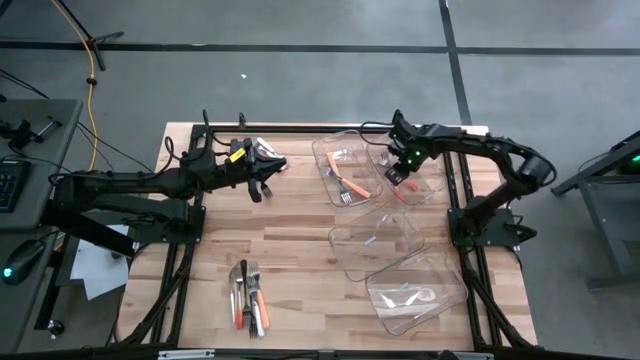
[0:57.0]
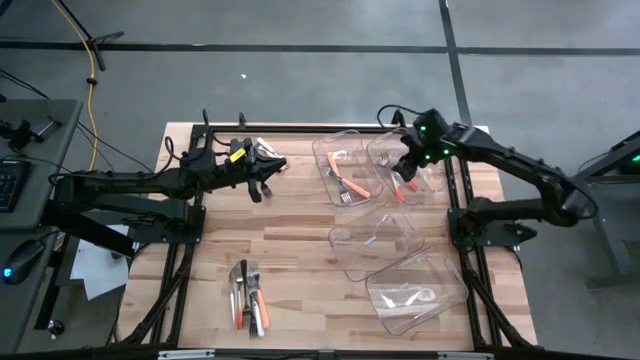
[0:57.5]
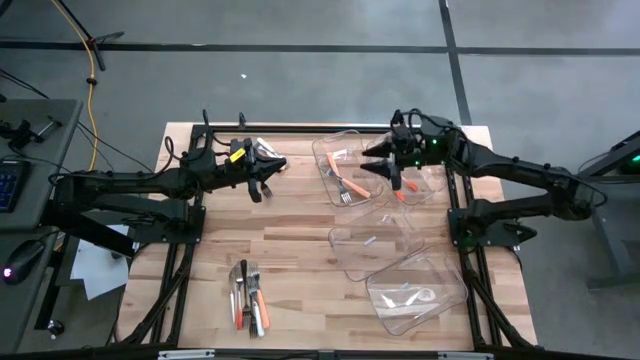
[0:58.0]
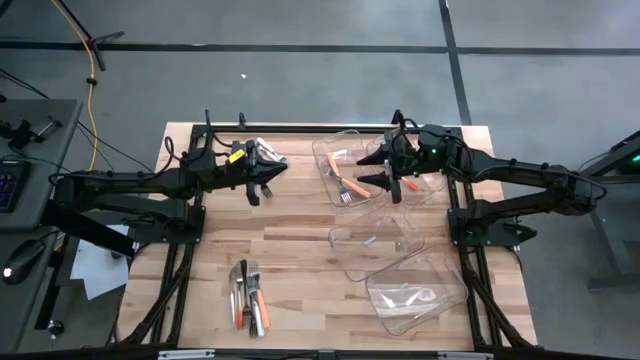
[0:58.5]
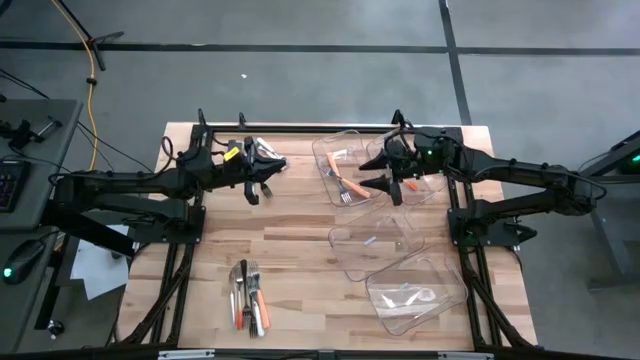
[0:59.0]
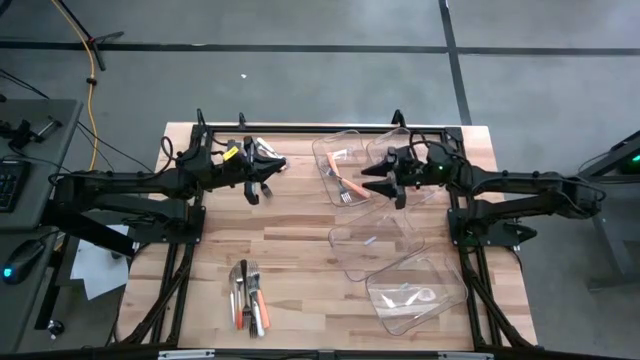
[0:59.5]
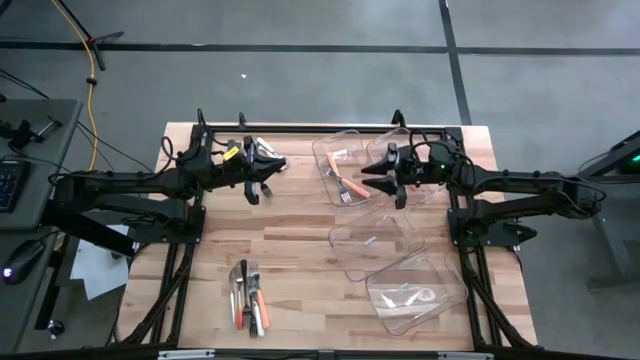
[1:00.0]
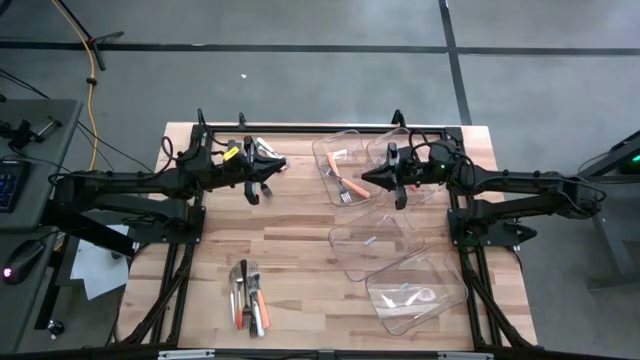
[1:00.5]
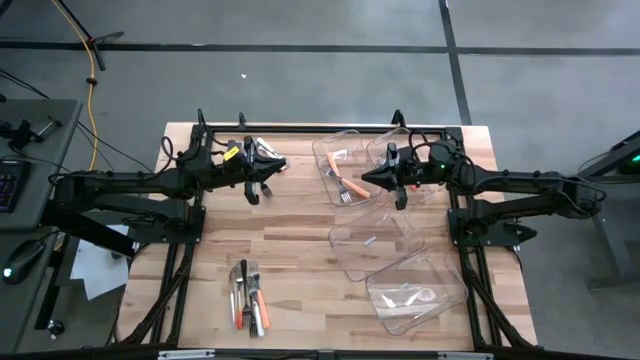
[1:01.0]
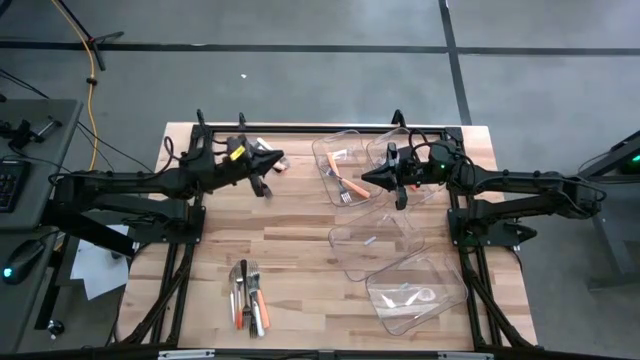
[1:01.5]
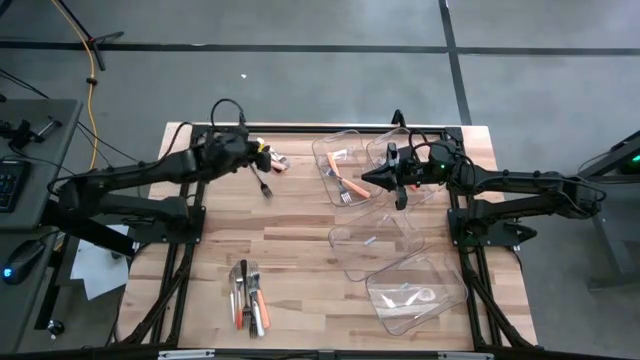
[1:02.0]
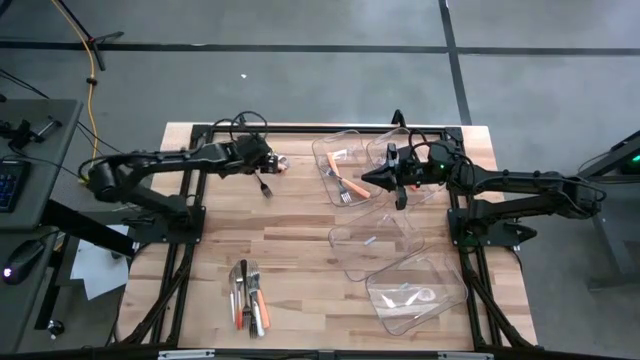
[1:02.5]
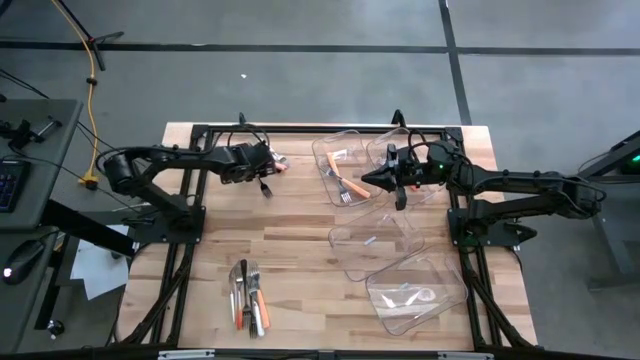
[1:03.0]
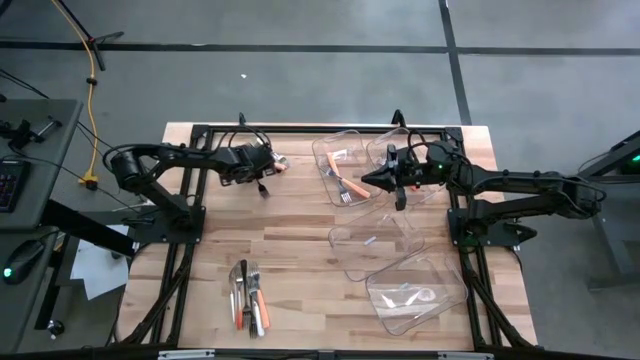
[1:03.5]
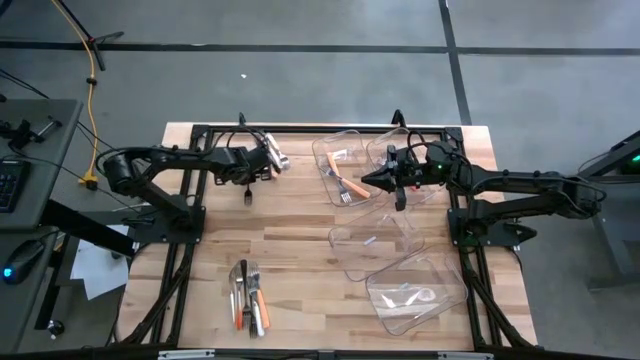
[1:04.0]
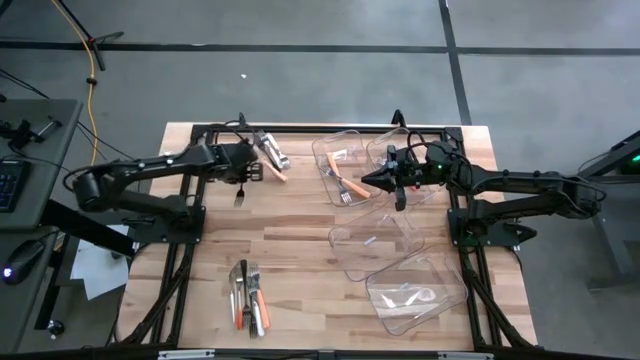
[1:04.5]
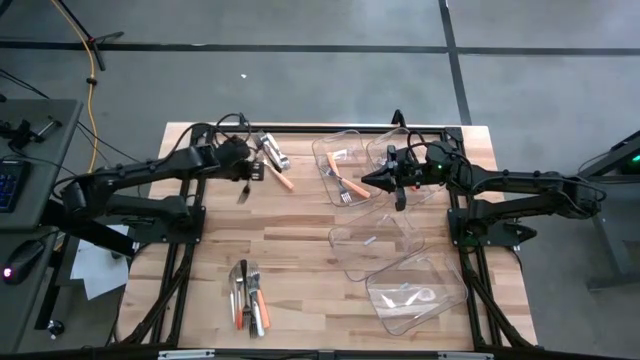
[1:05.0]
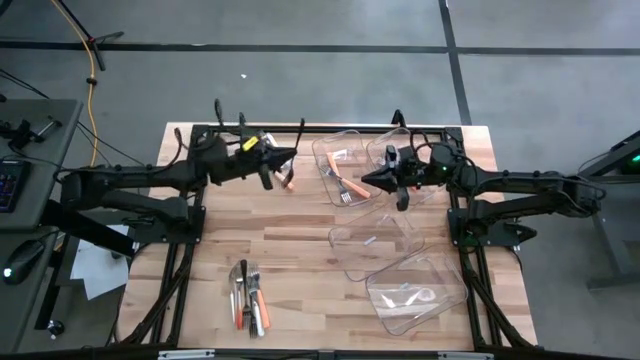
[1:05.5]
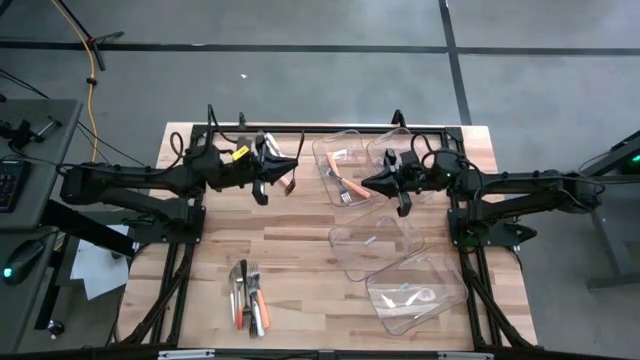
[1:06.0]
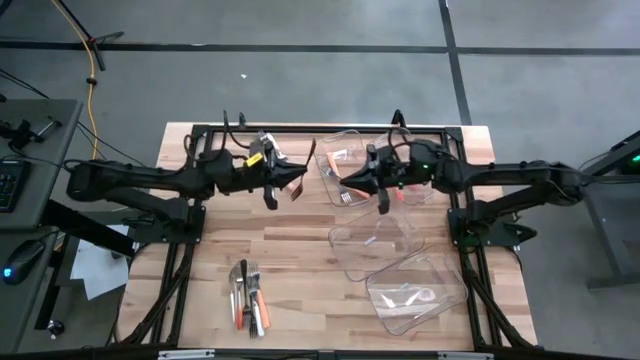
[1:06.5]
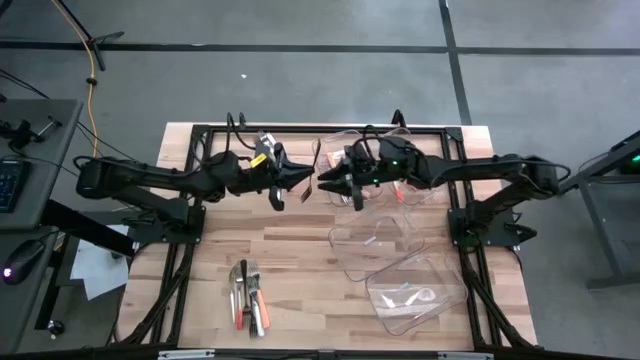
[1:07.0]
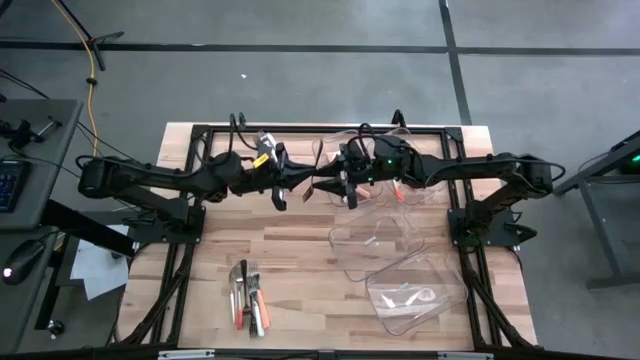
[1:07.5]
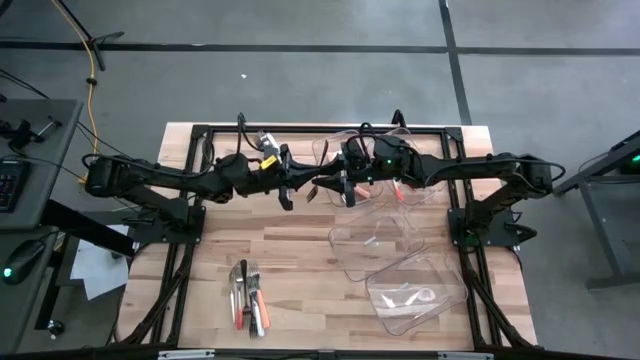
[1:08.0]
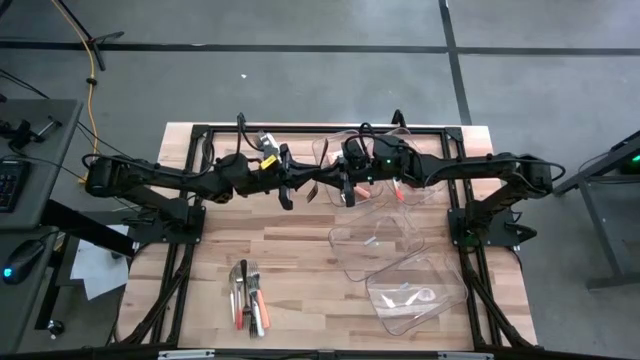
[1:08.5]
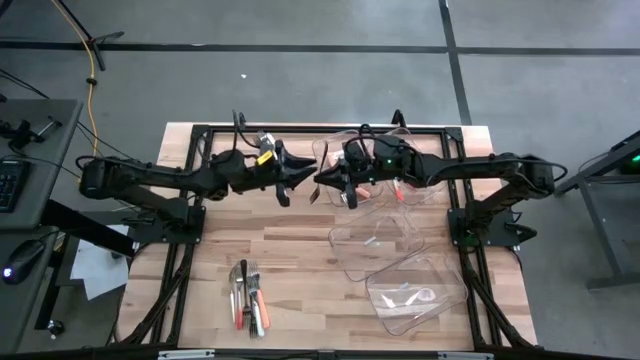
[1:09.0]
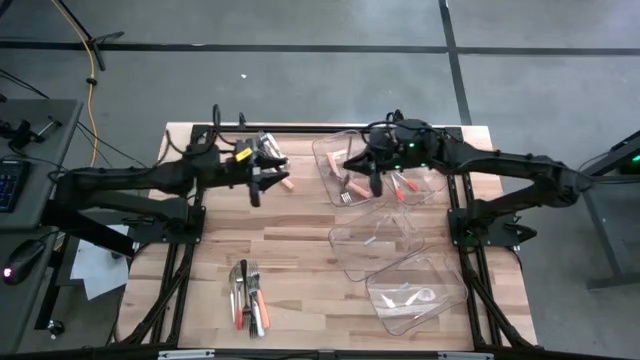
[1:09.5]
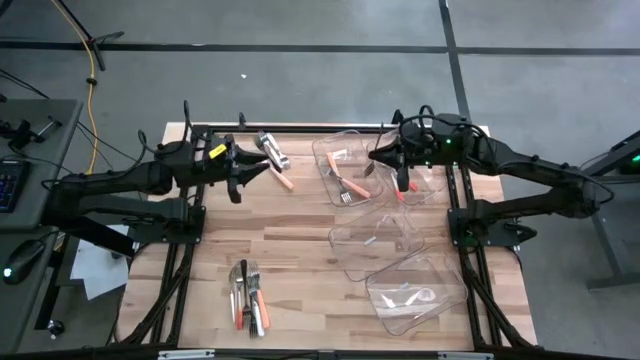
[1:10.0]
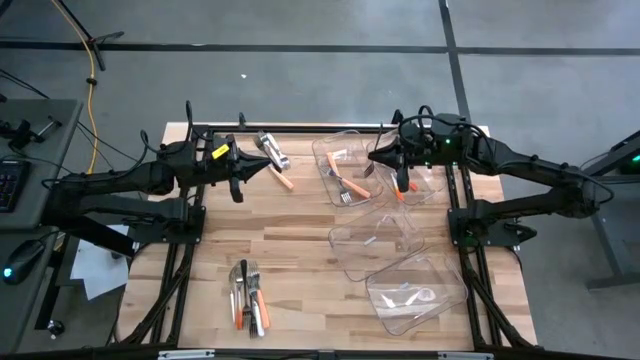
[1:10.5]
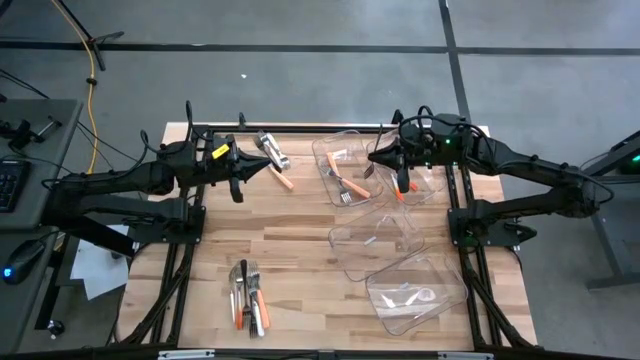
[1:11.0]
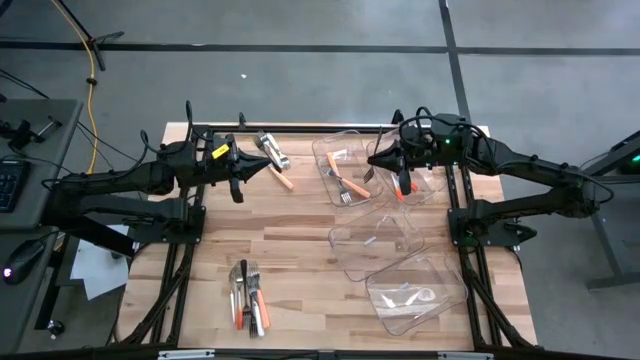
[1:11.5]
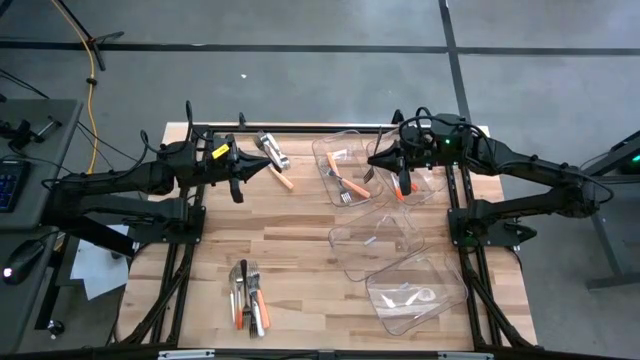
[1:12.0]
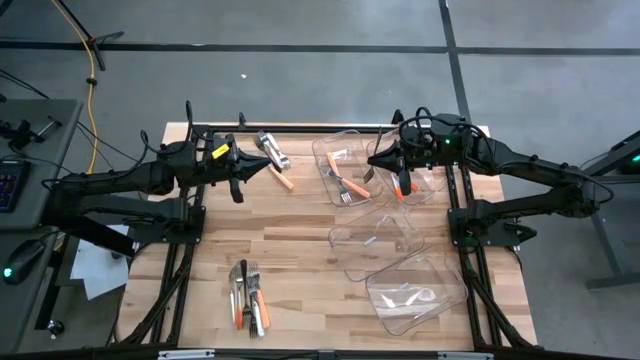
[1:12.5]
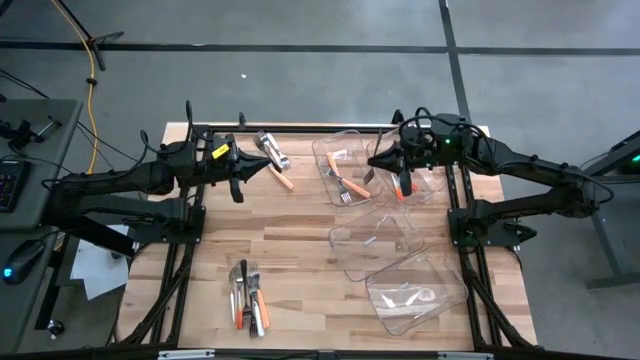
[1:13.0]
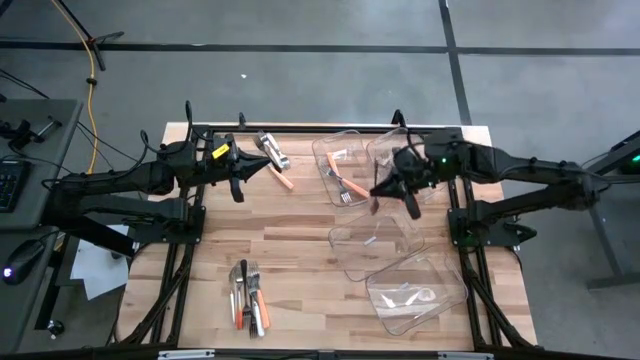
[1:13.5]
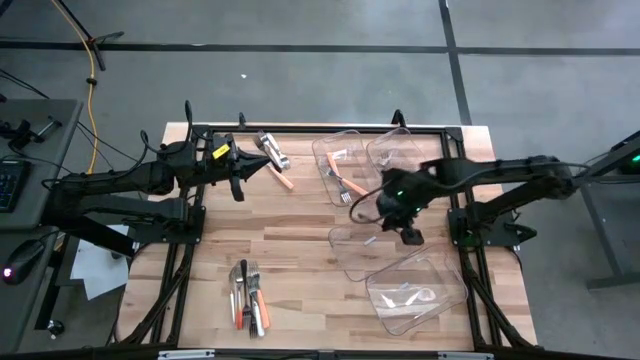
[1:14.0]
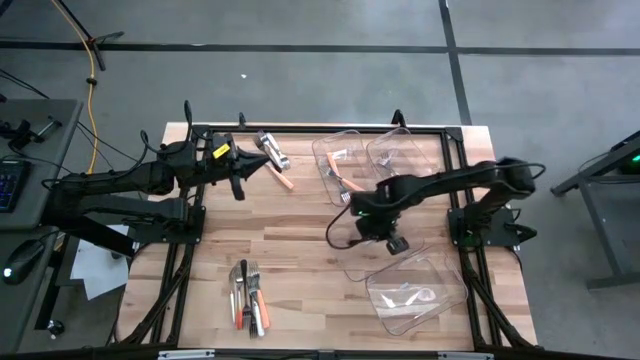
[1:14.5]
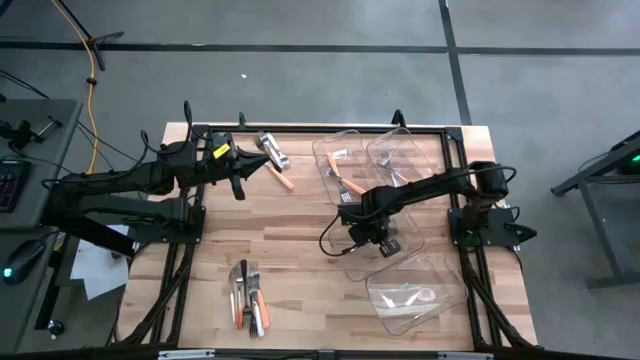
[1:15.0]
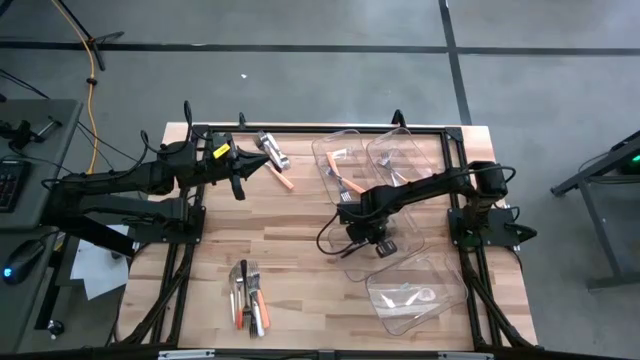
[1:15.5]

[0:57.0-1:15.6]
Task: Sort silverware by color (type)
Put the black fork into the middle transparent bin

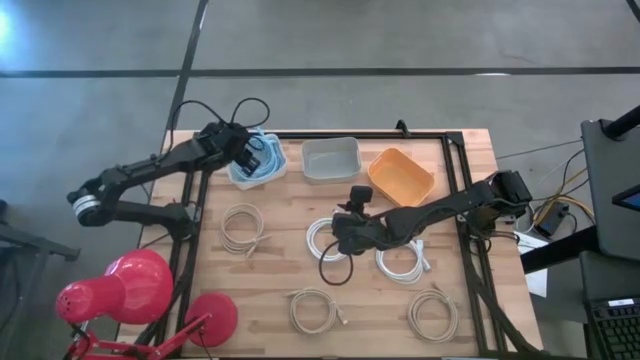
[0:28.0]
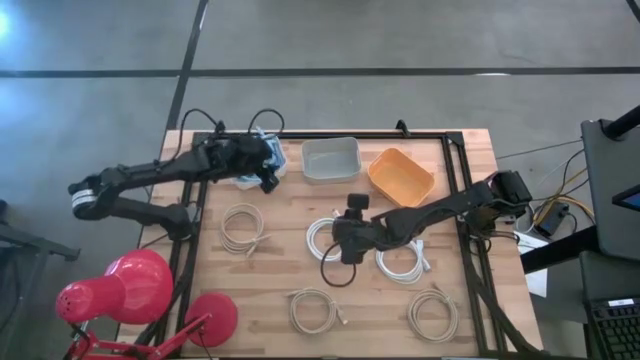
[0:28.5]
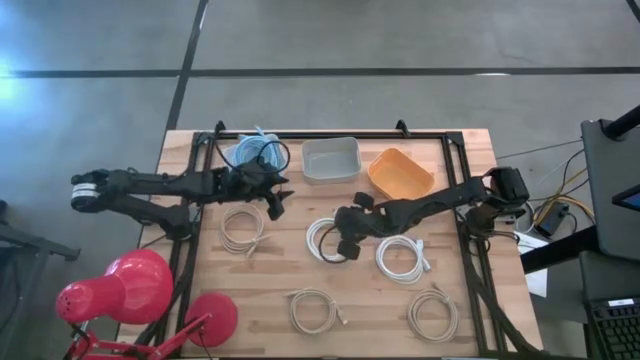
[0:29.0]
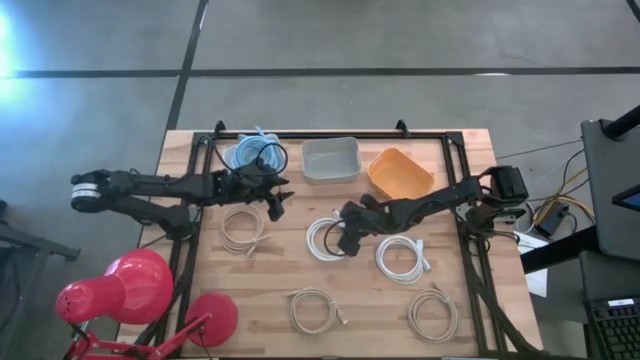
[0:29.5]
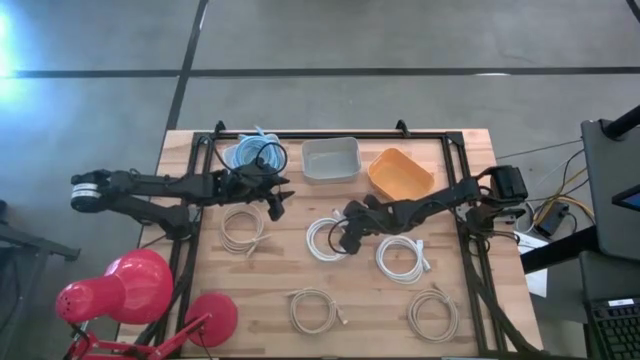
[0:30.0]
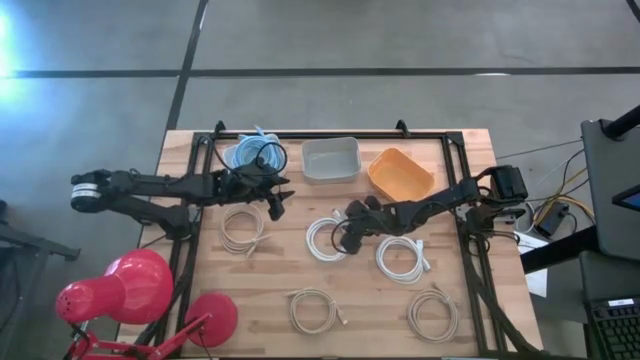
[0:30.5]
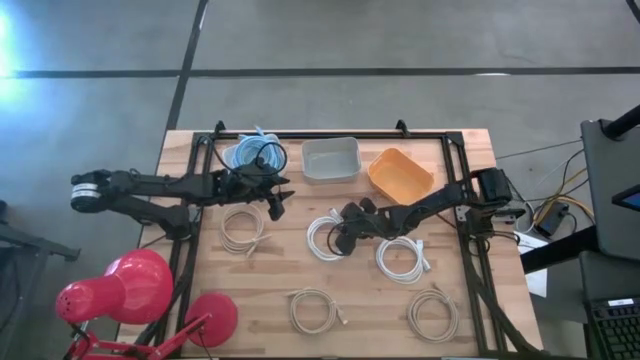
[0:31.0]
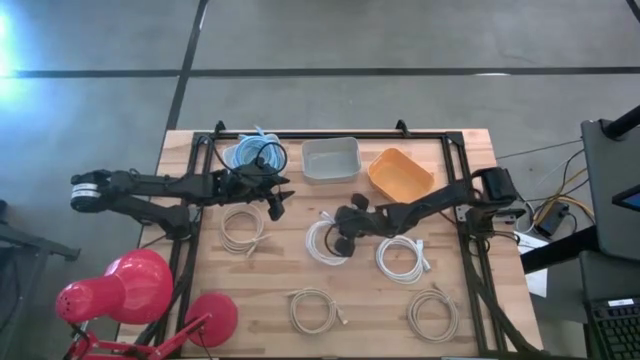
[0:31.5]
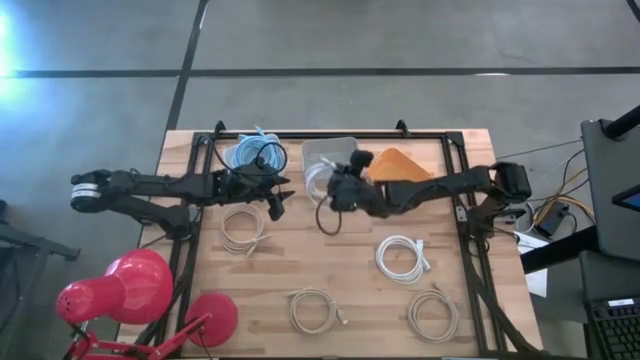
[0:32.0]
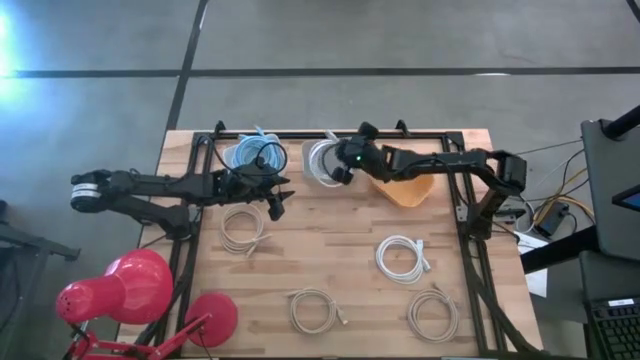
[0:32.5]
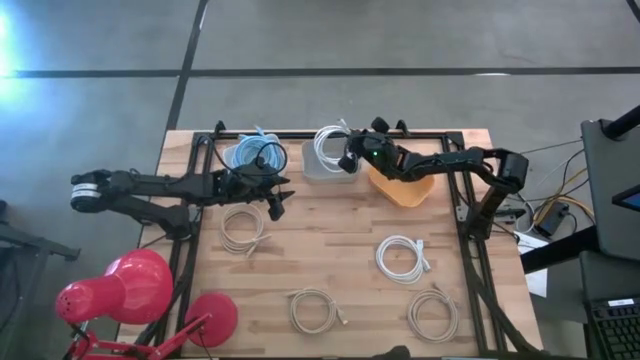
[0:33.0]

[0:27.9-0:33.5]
Task: Pick & Place USB Port
Put the left white cable into the gray bin
